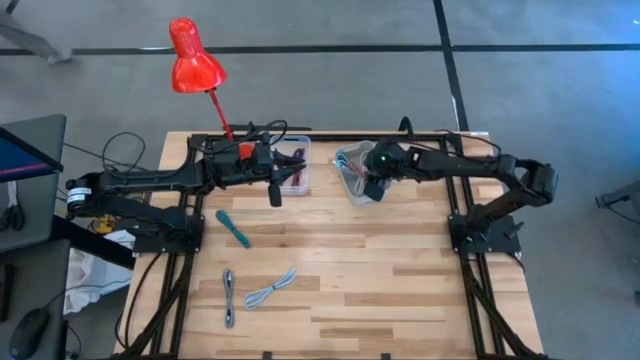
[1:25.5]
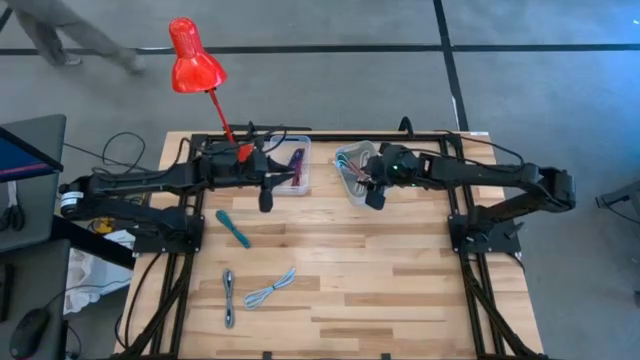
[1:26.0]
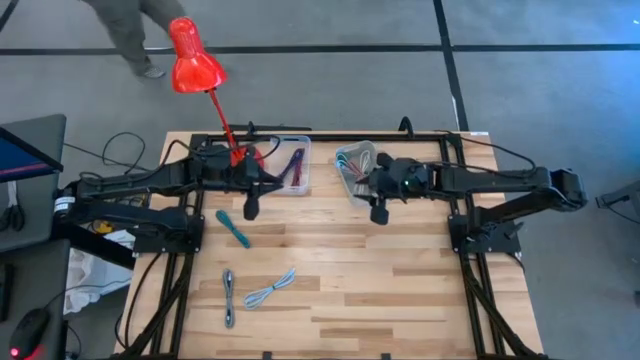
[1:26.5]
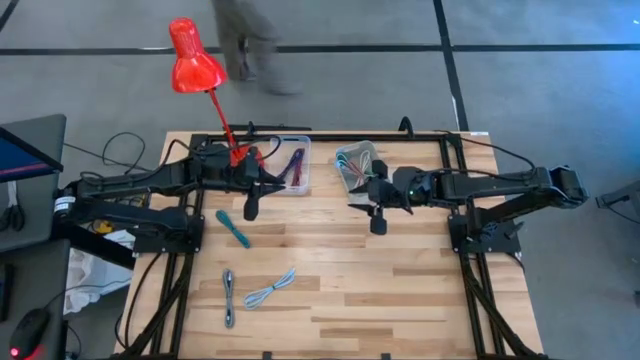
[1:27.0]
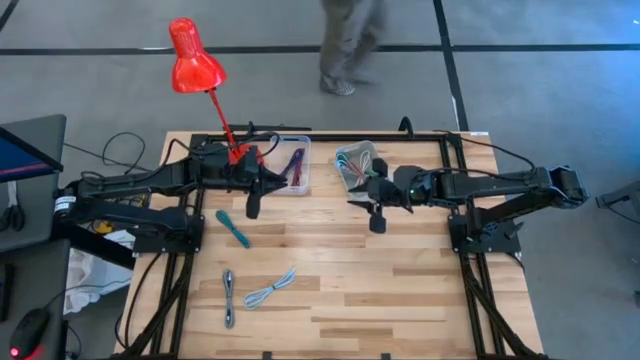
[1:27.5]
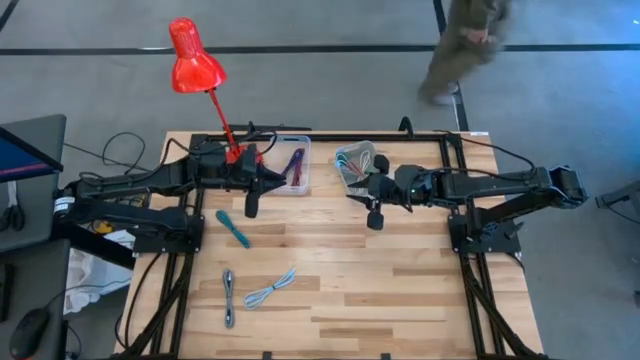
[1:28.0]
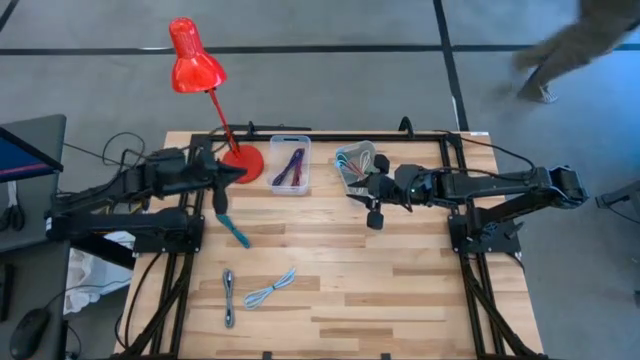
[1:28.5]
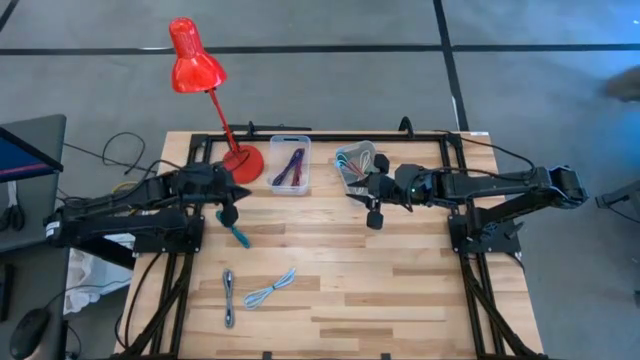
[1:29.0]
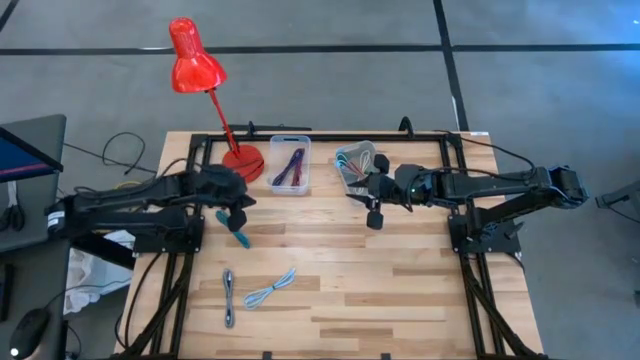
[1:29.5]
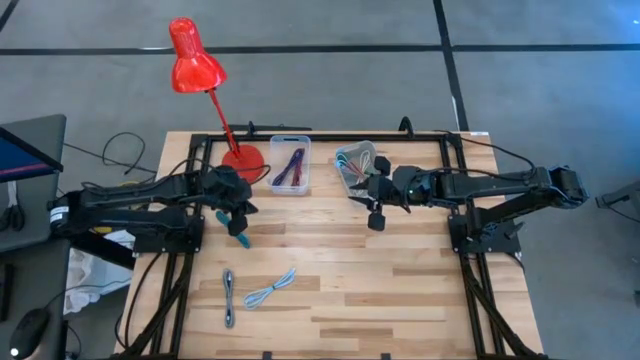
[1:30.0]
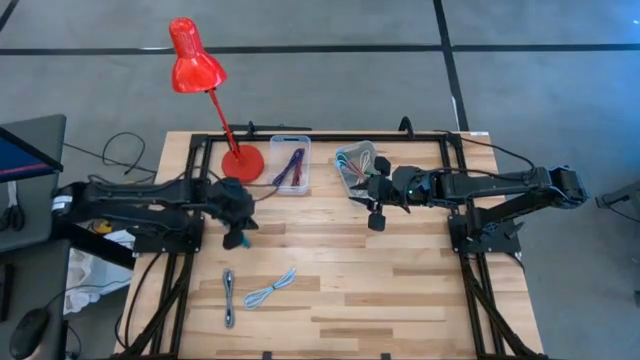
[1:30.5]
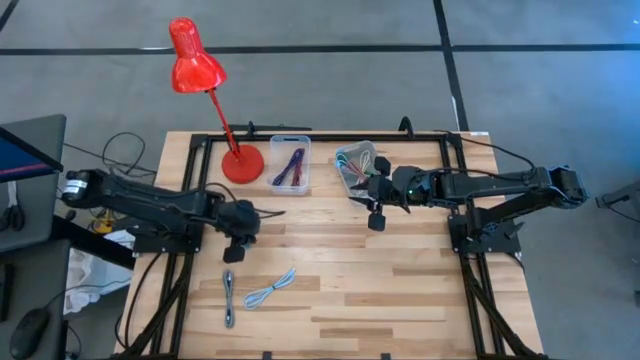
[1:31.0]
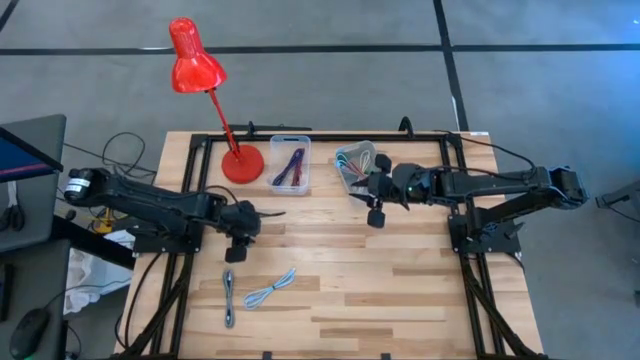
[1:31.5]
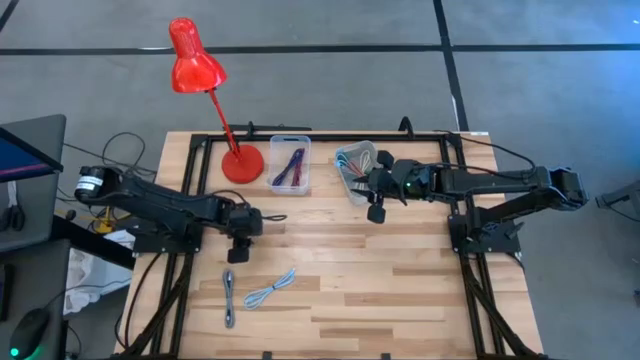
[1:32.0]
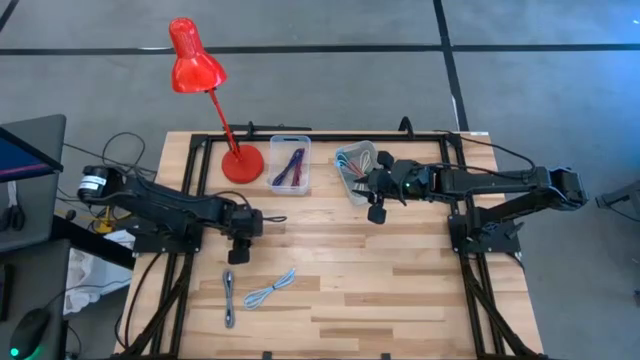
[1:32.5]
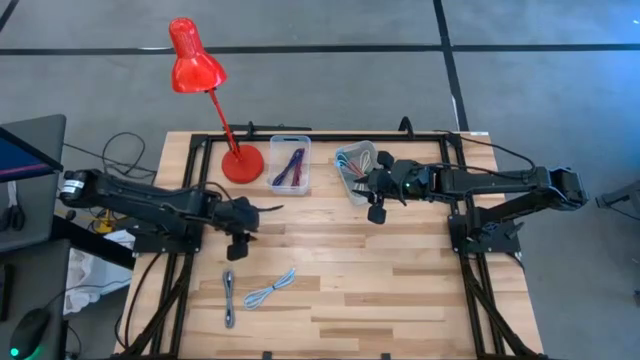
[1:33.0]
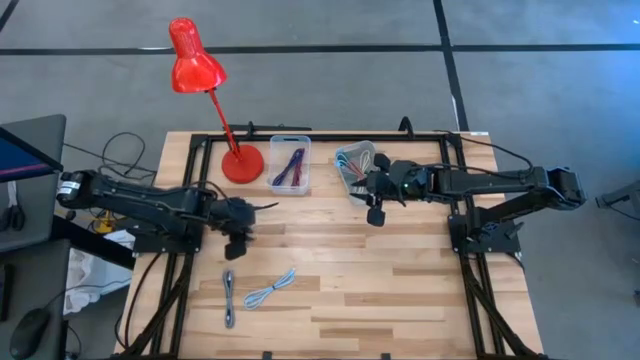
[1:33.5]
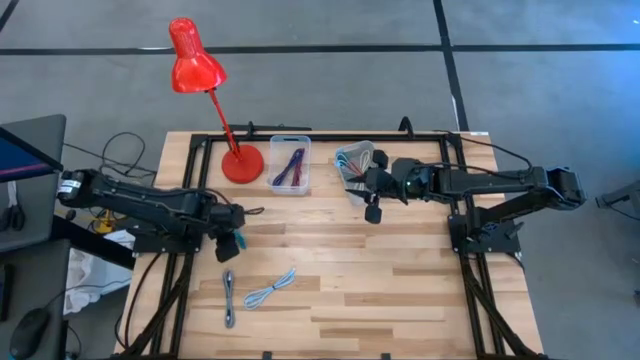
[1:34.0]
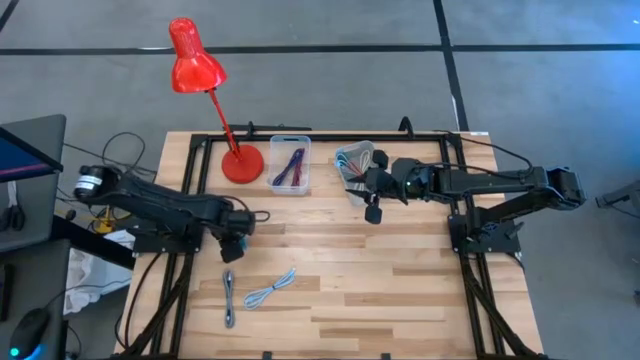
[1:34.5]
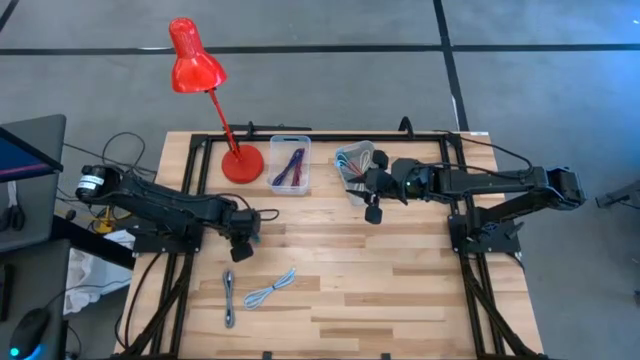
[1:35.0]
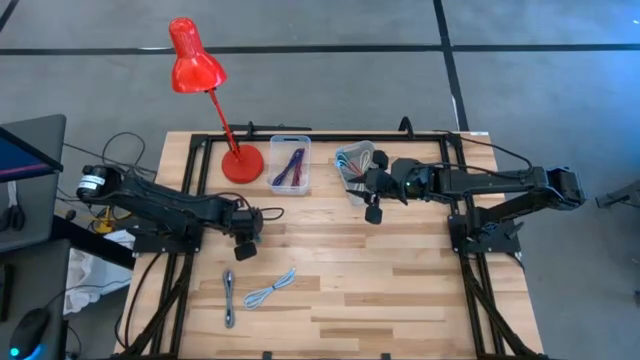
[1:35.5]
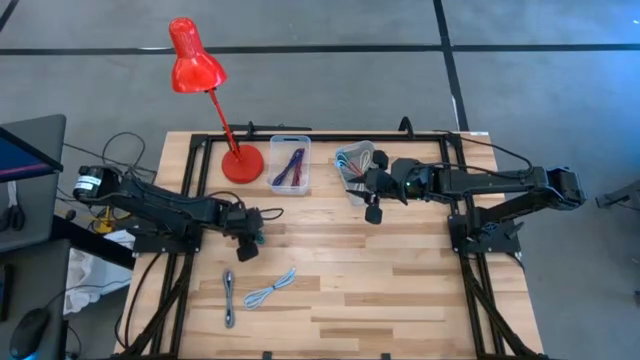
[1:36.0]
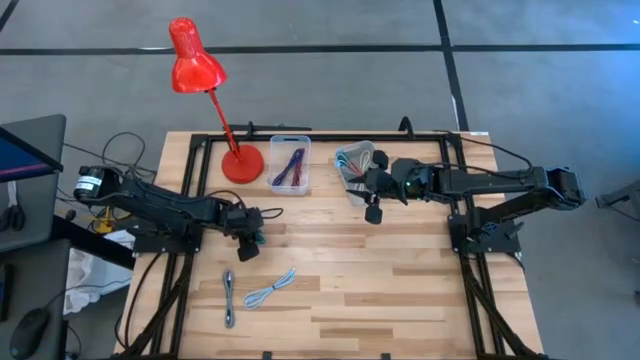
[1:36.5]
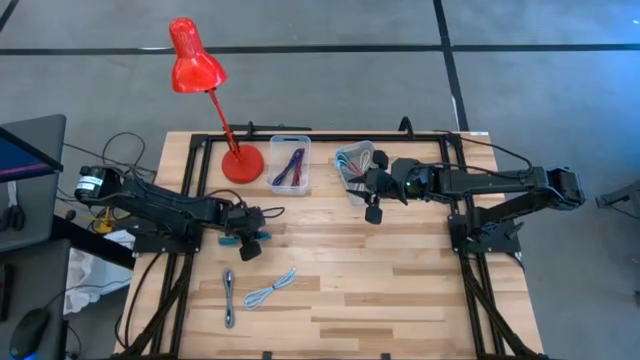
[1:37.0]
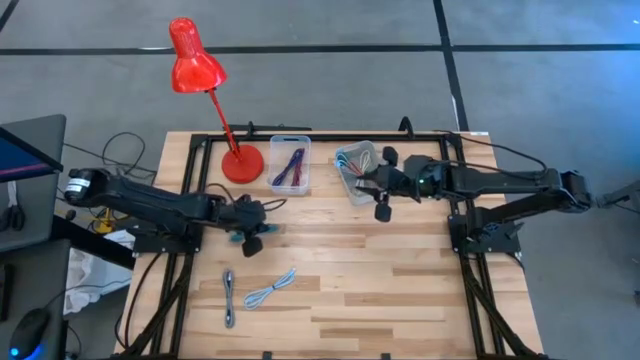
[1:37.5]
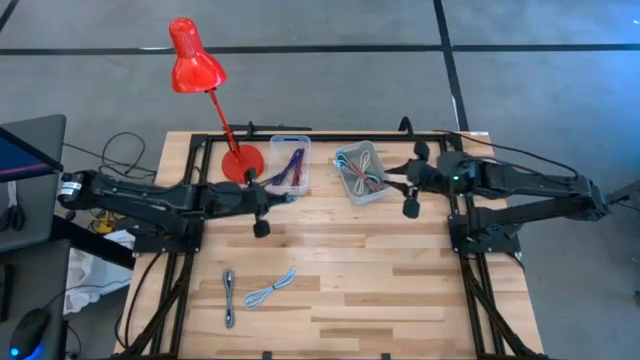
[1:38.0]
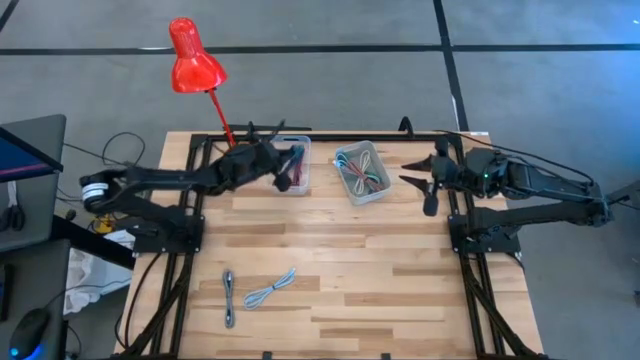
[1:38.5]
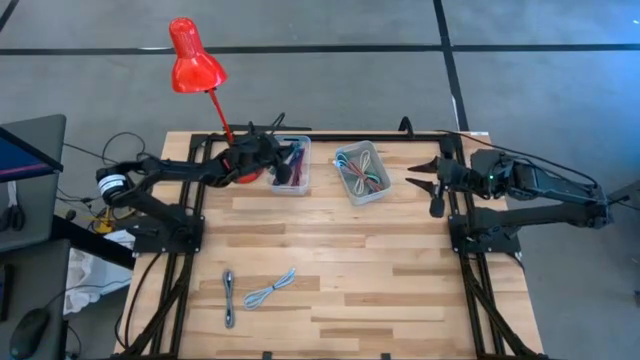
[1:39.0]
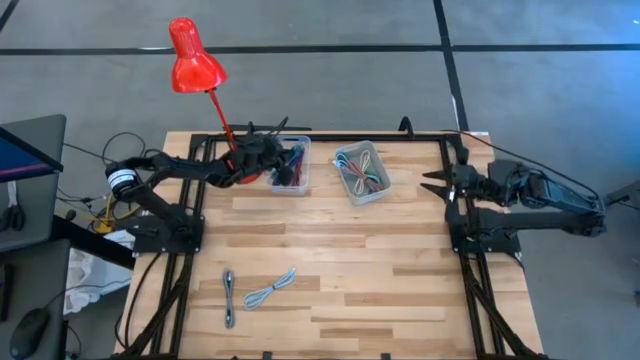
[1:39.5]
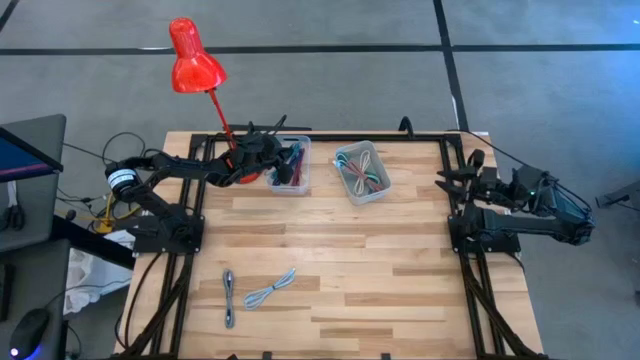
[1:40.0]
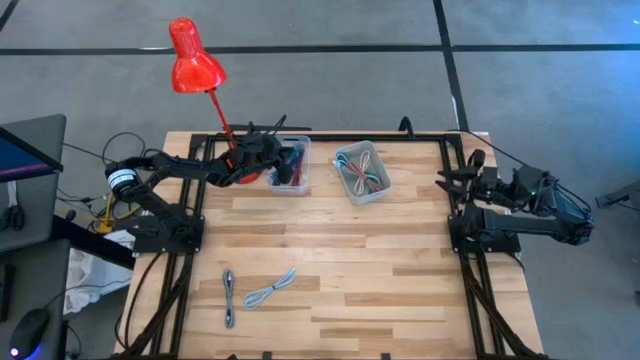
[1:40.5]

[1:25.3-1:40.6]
Task: Pick & Place USB Port
Put the blue patterned USB cable into the transparent bin

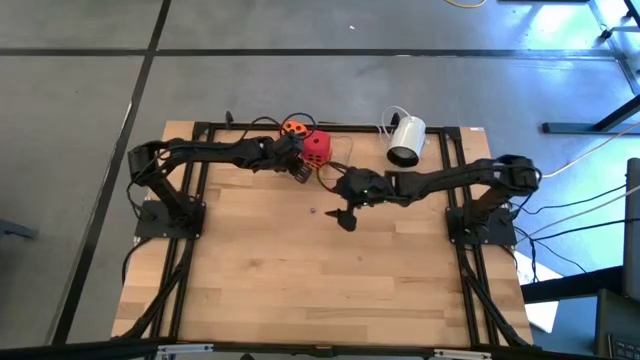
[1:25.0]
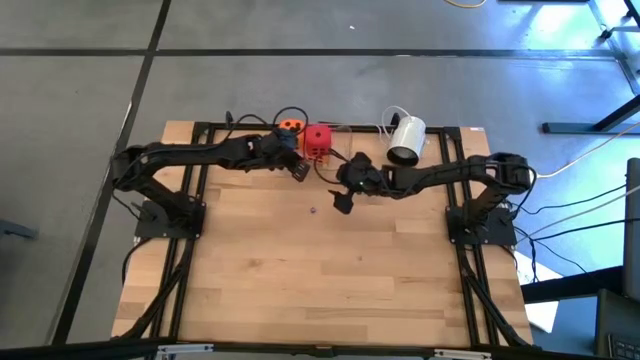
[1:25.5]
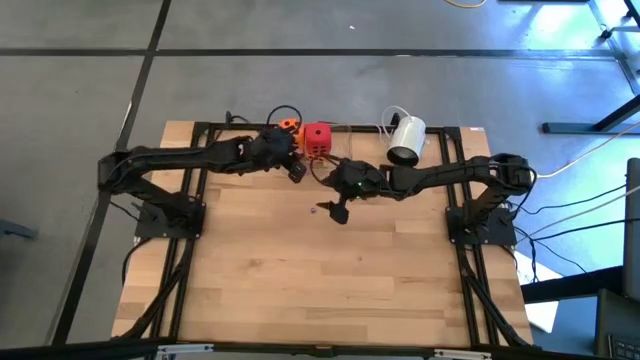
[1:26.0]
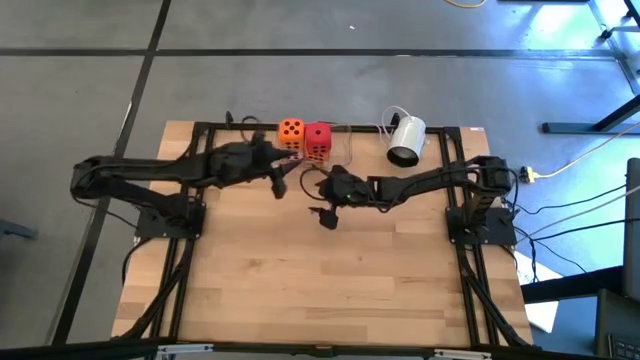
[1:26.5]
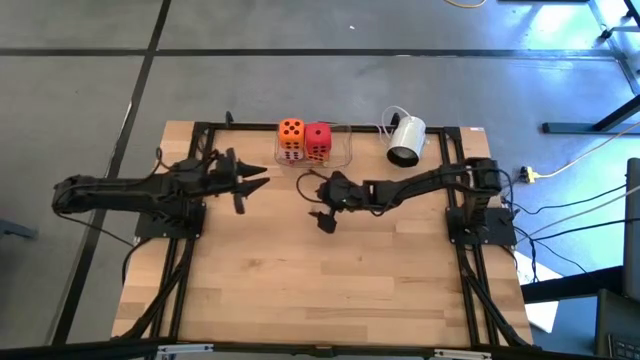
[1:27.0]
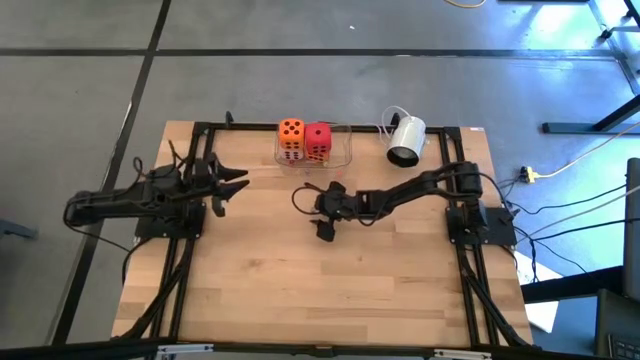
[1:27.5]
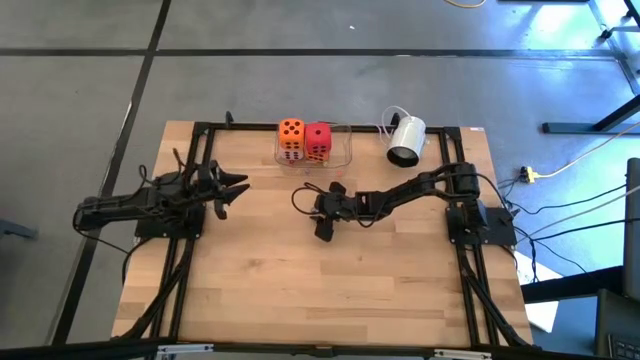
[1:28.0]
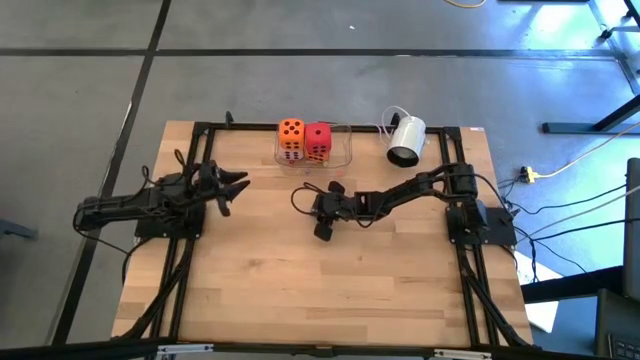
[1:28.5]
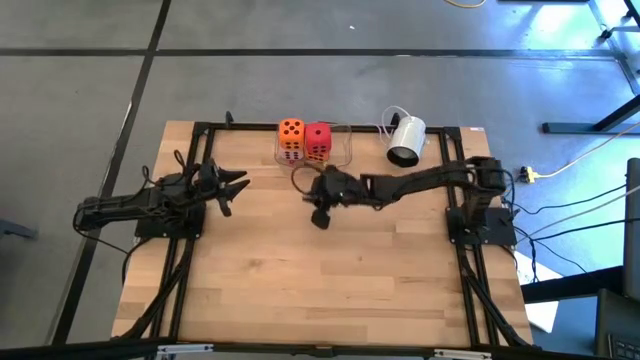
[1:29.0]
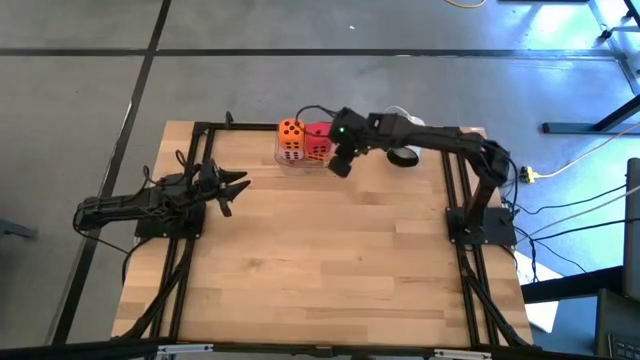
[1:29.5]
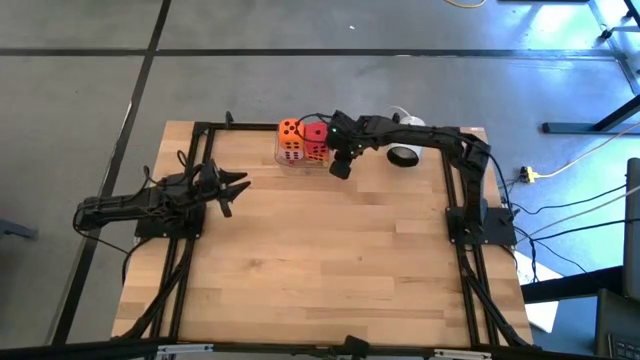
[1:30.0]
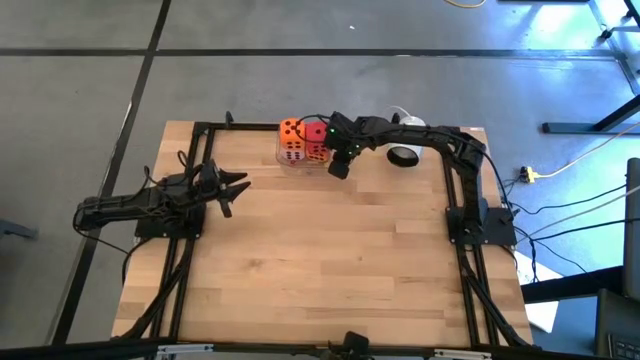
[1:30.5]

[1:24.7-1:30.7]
Task: Pick & Place Dice
Put the small blue dice in the transparent bin
